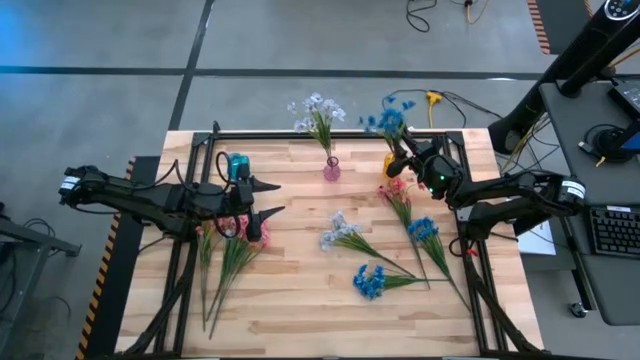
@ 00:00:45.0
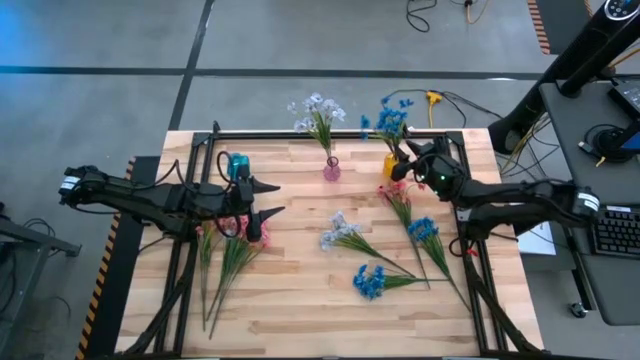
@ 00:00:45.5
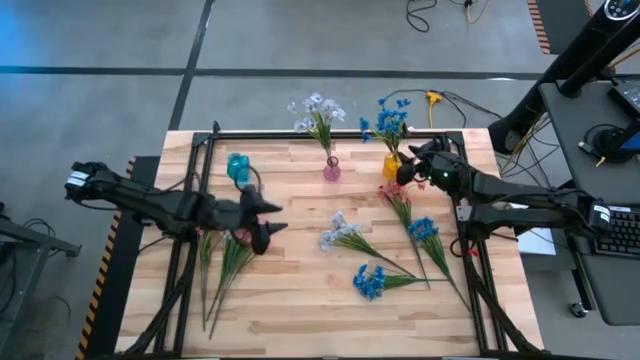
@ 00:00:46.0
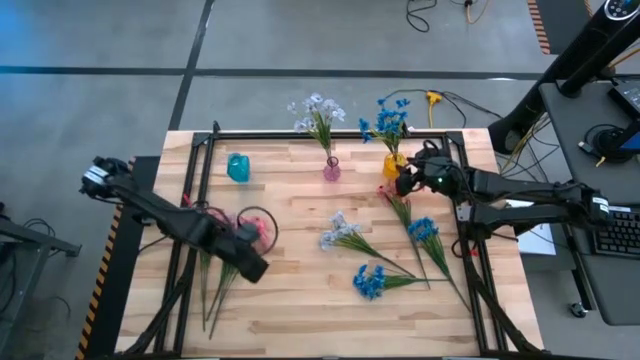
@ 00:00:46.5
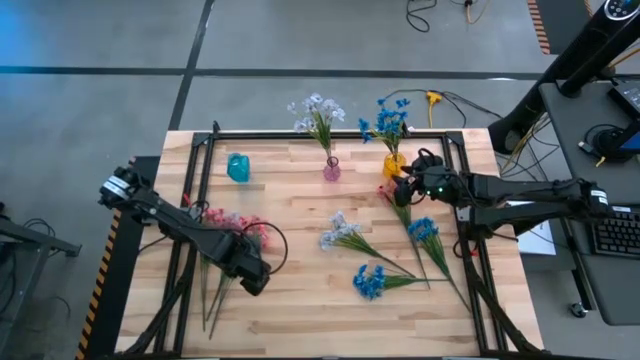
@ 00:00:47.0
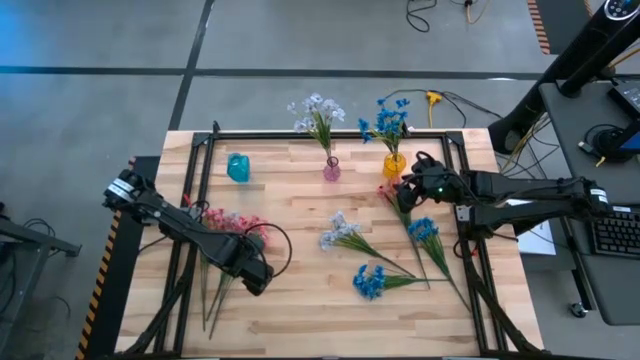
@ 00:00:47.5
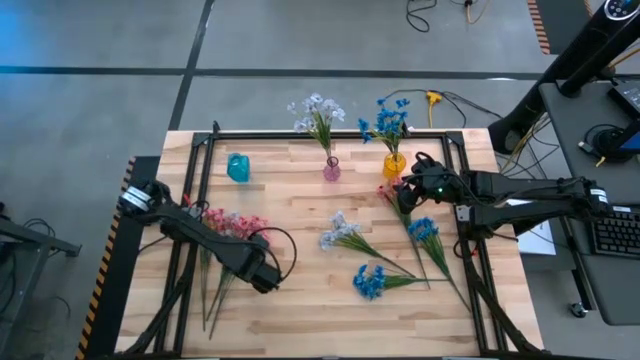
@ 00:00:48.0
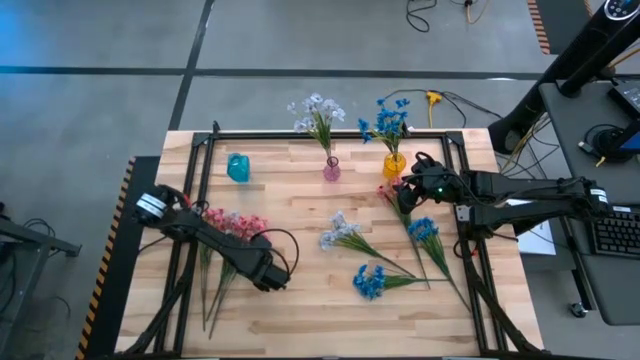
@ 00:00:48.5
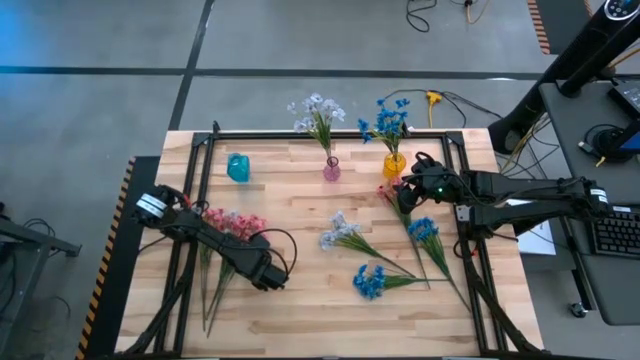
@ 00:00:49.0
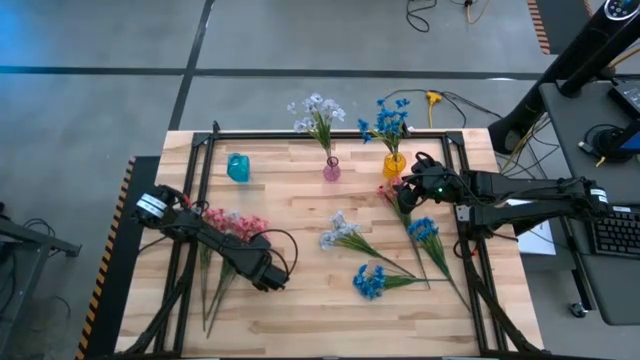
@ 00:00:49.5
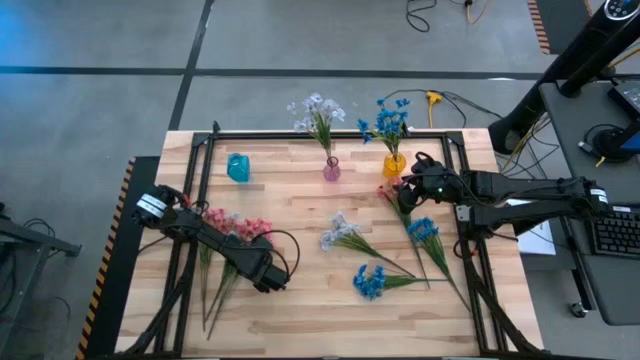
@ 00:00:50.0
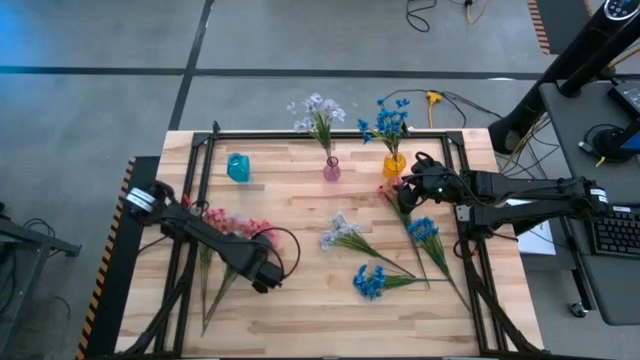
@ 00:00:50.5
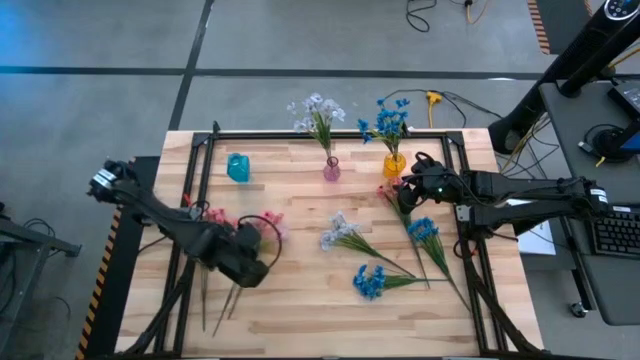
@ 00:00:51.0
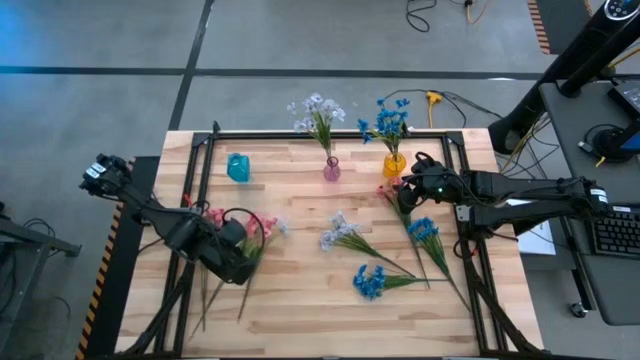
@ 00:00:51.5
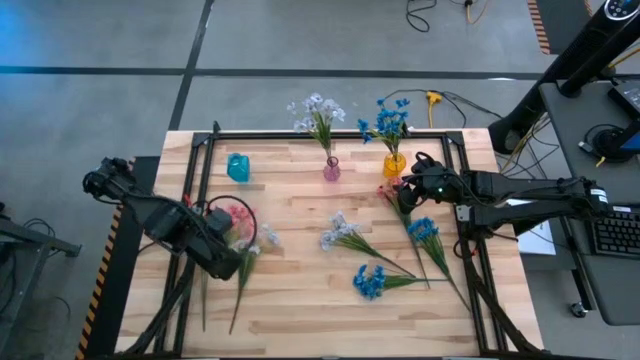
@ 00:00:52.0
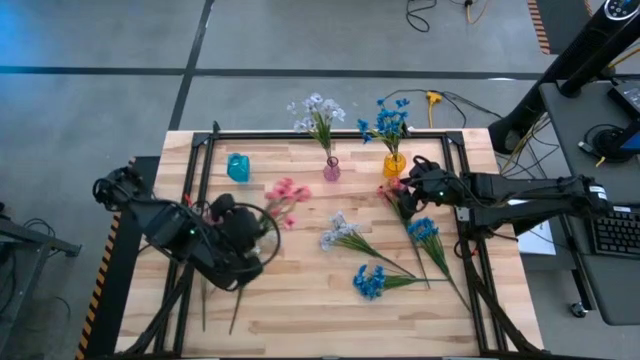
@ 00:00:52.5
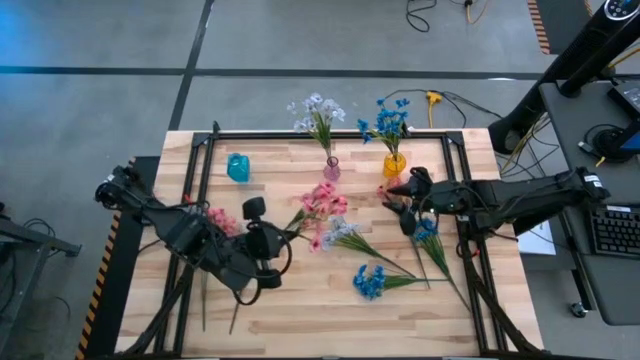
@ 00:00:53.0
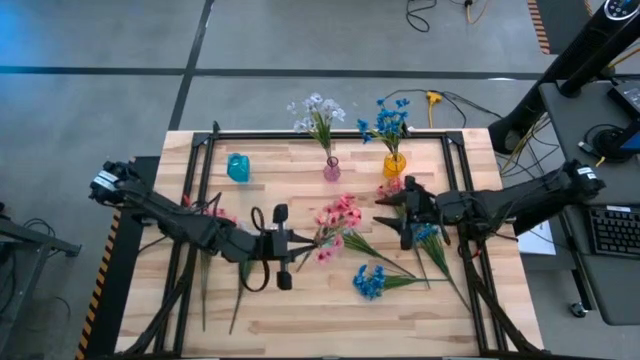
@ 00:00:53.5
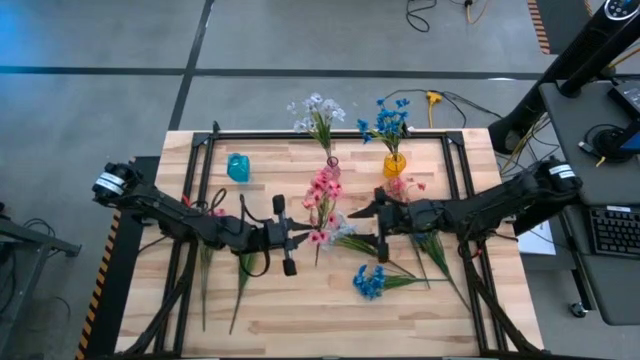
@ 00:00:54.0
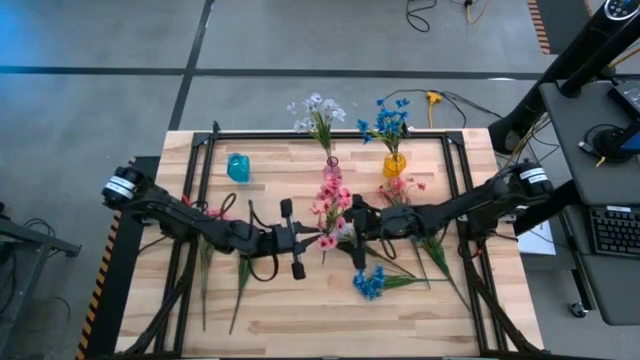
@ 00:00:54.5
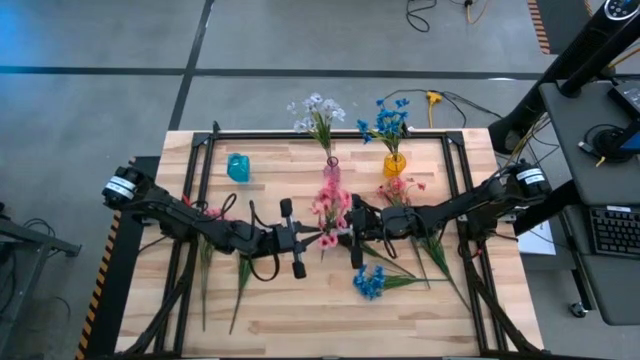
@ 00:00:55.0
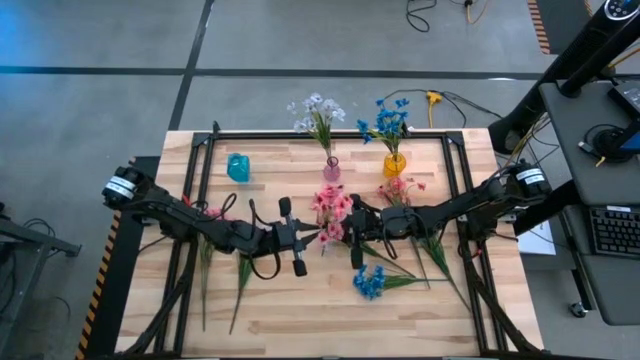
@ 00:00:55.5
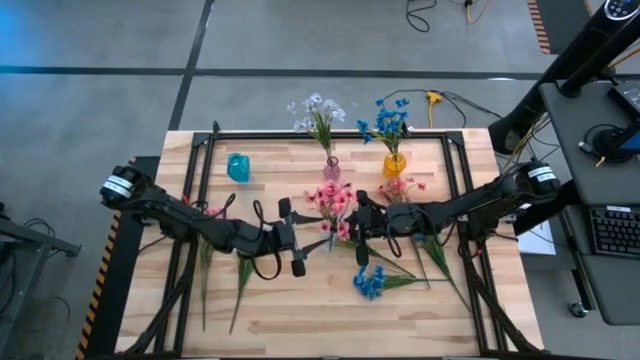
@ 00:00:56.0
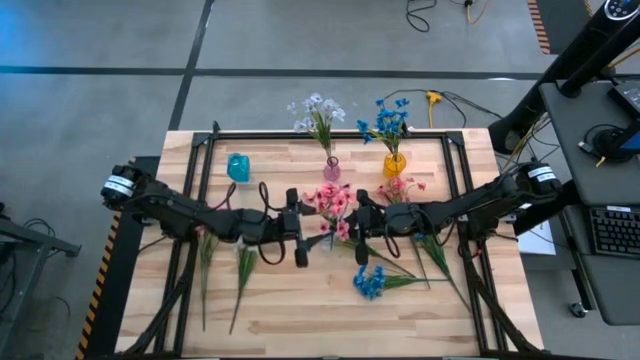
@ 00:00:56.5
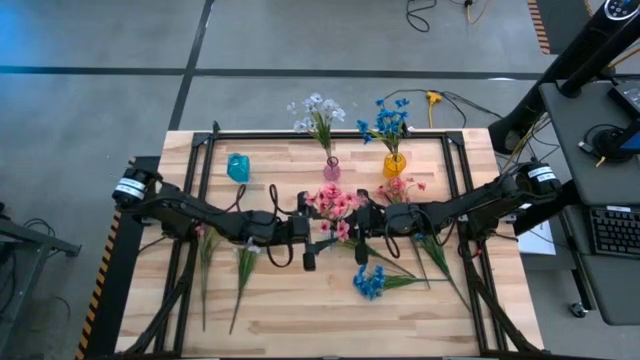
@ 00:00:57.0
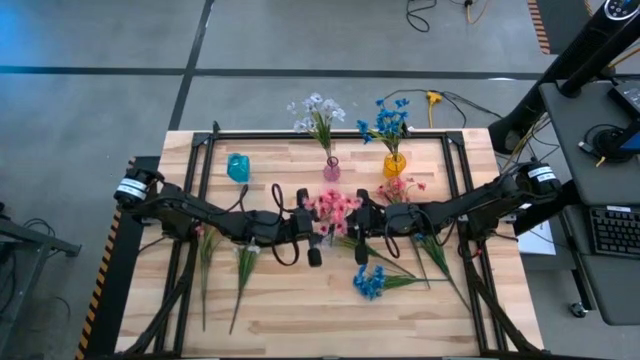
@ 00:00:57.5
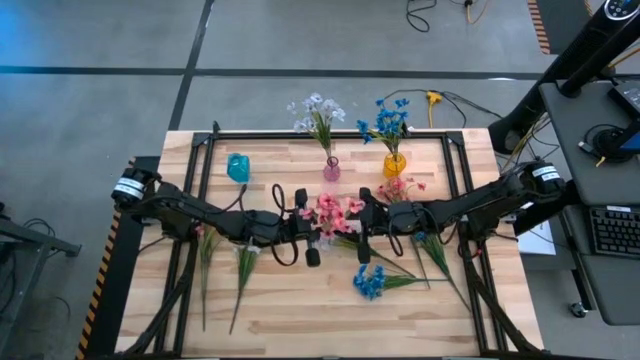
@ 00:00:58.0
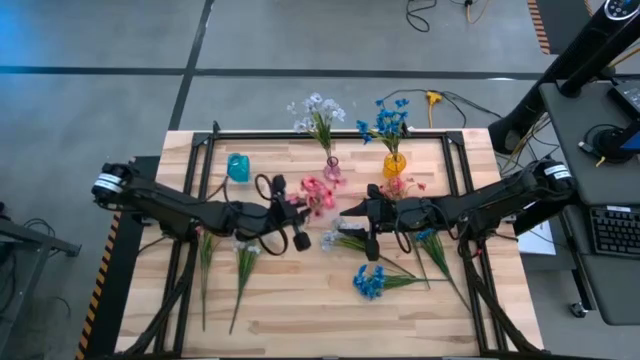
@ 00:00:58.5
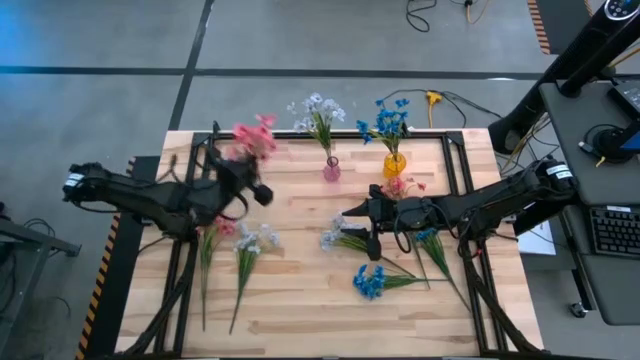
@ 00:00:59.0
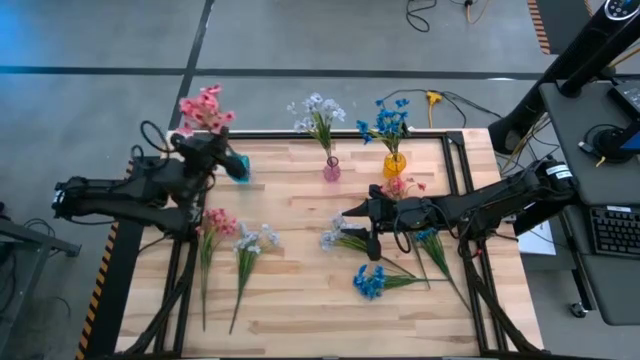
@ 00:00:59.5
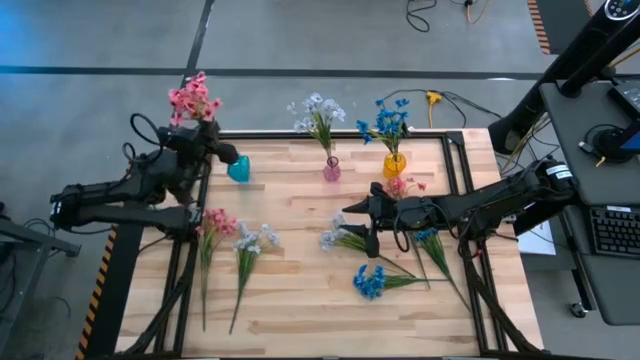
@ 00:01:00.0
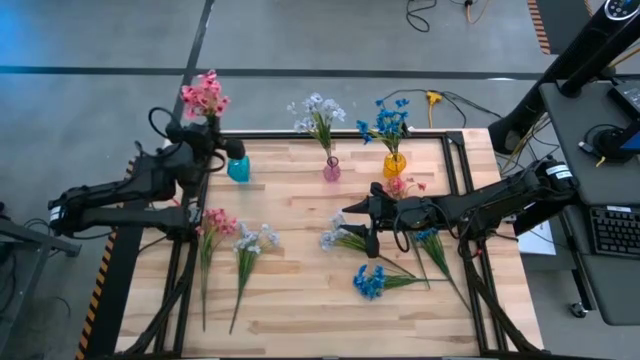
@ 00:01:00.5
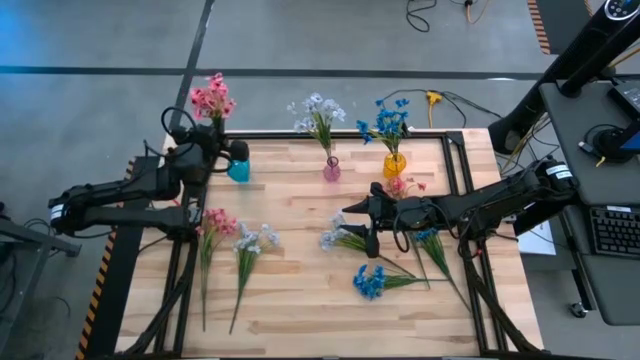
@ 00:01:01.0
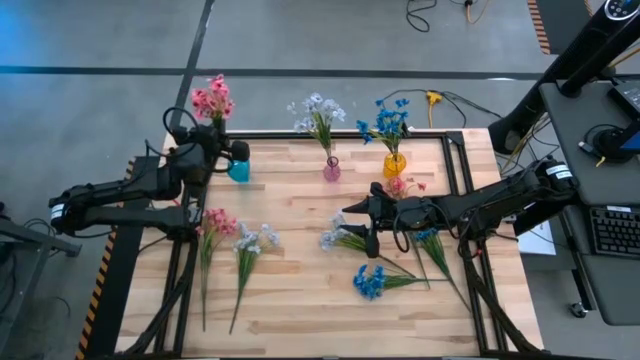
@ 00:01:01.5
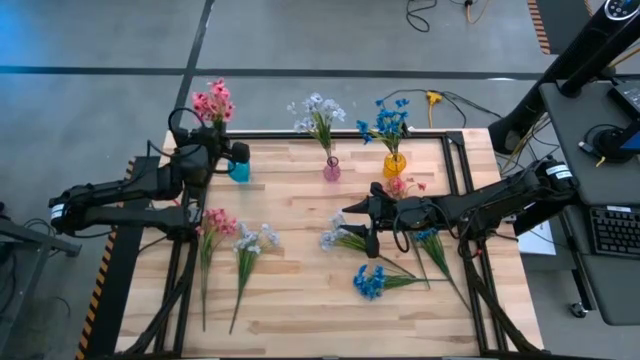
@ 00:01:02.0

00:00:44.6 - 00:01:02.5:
Task: Sort flowers into vase by color
Put the middle pink flowers into the blue vase
